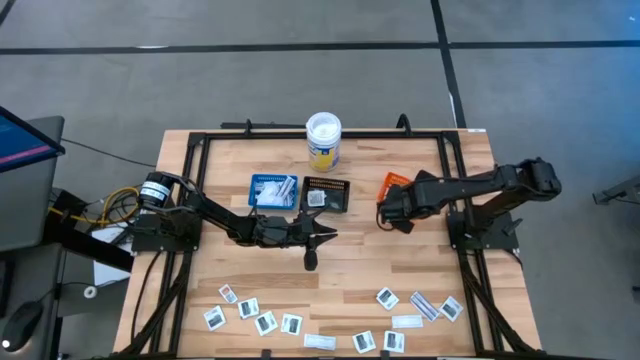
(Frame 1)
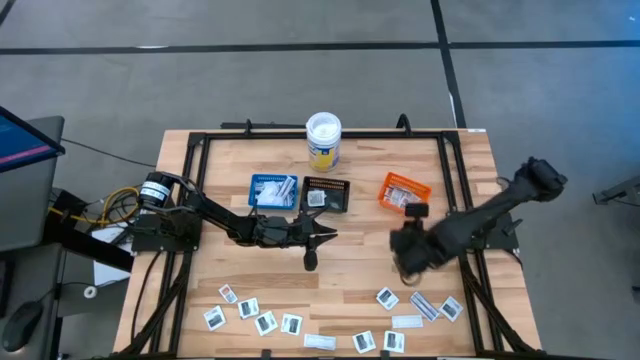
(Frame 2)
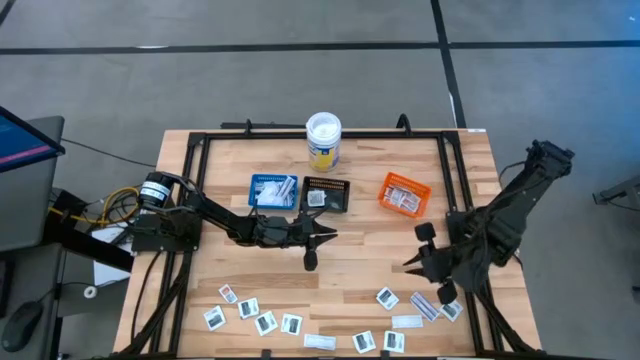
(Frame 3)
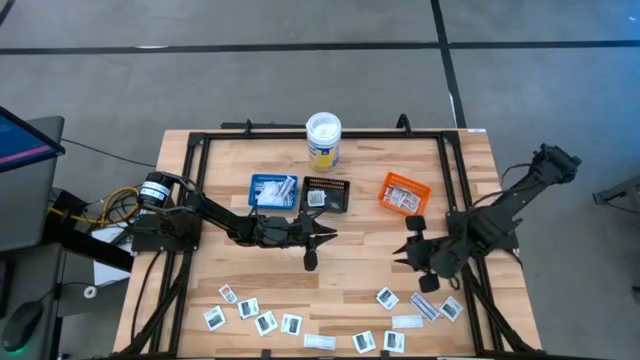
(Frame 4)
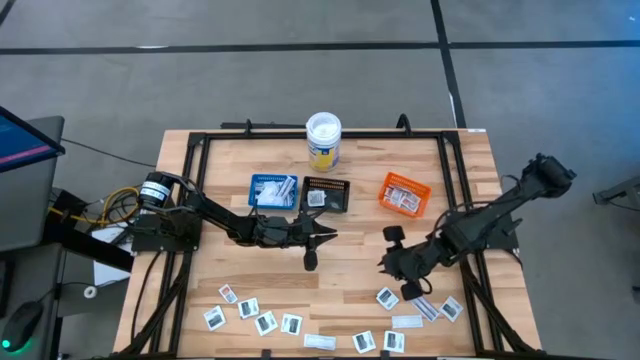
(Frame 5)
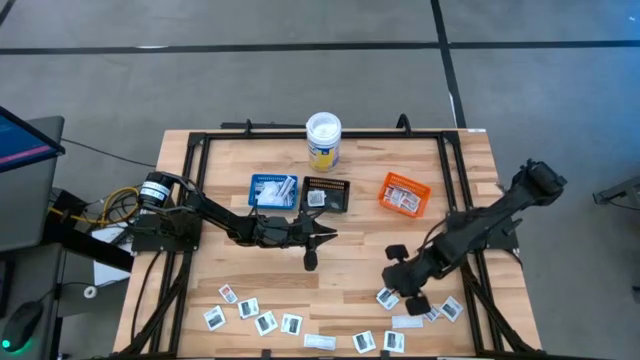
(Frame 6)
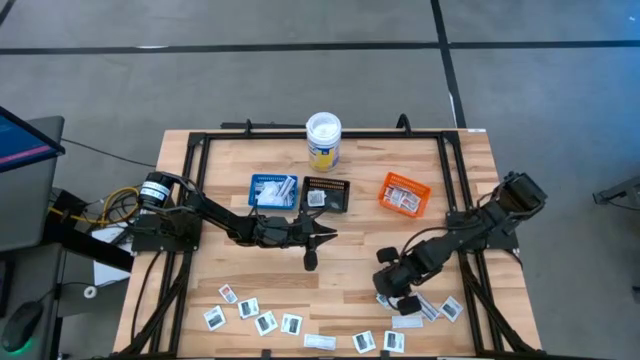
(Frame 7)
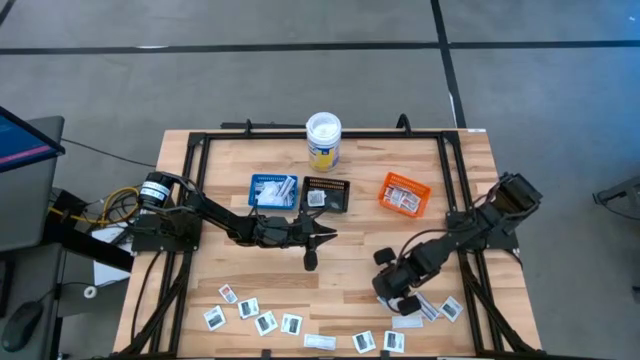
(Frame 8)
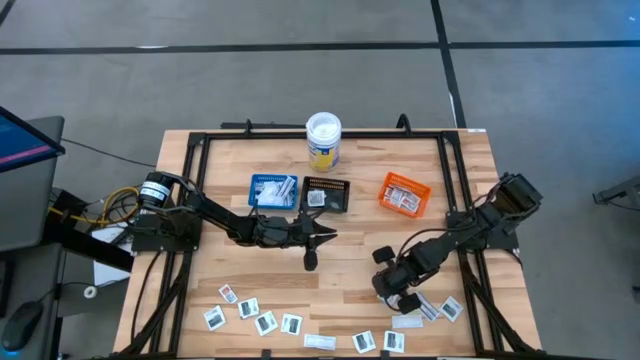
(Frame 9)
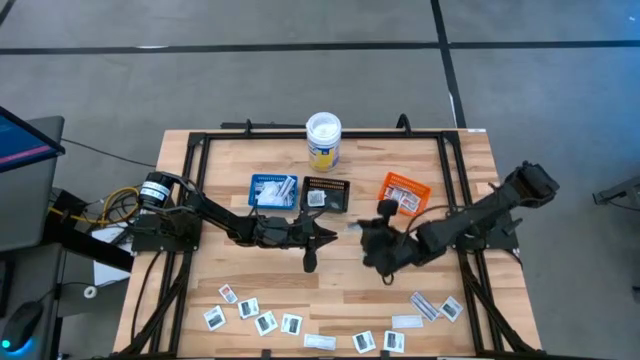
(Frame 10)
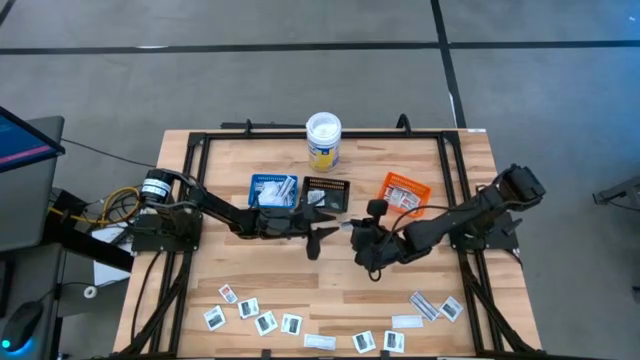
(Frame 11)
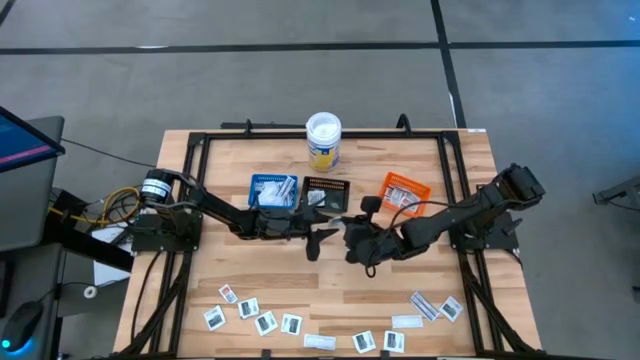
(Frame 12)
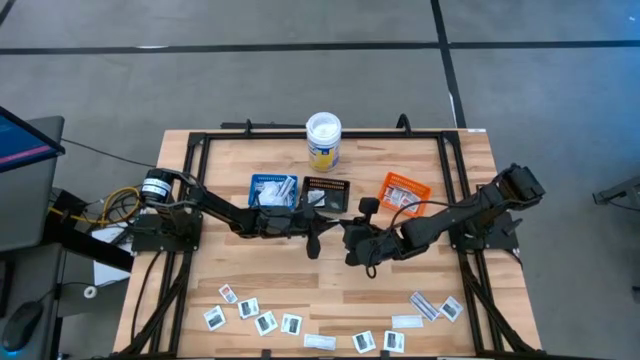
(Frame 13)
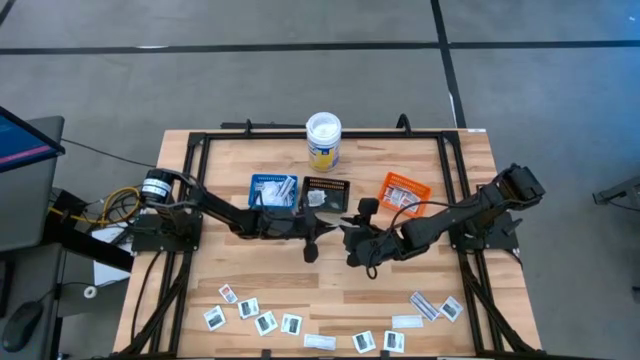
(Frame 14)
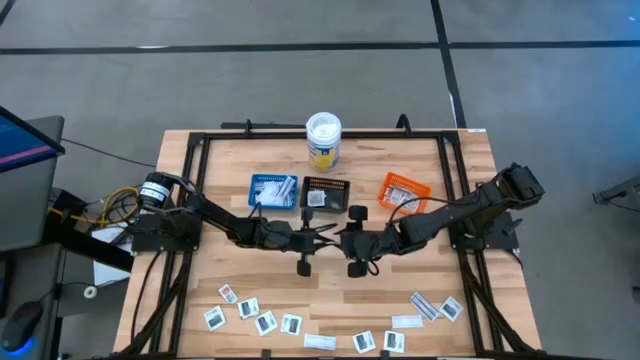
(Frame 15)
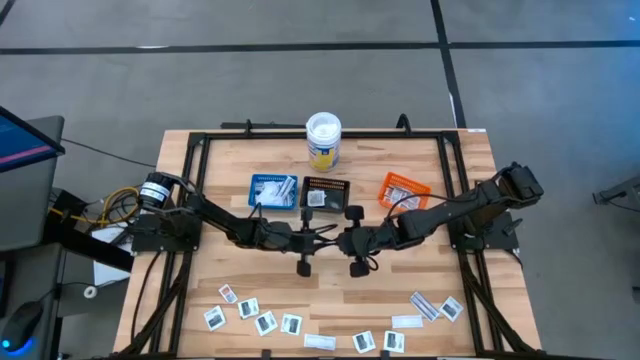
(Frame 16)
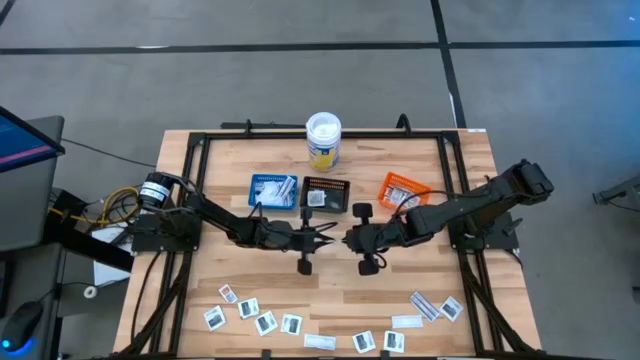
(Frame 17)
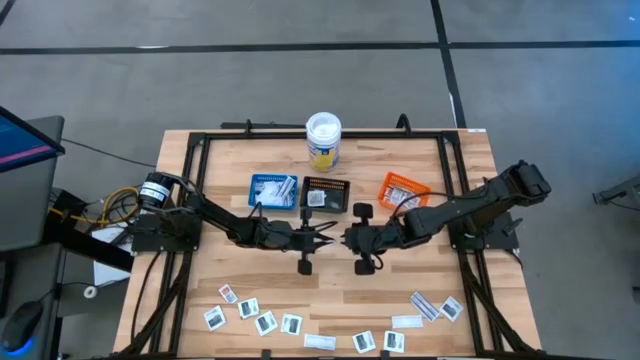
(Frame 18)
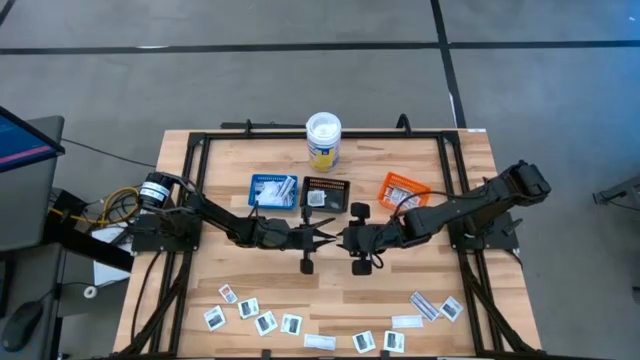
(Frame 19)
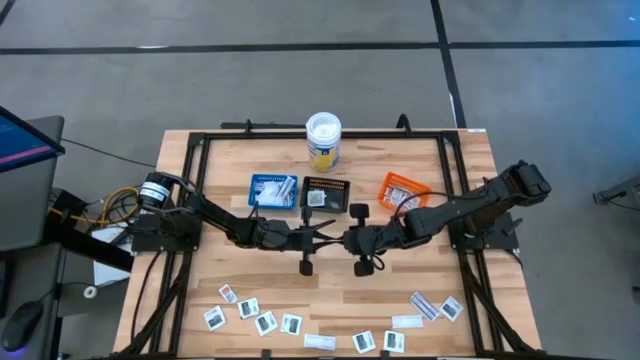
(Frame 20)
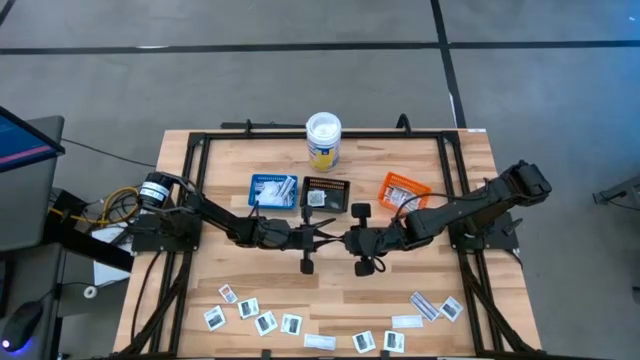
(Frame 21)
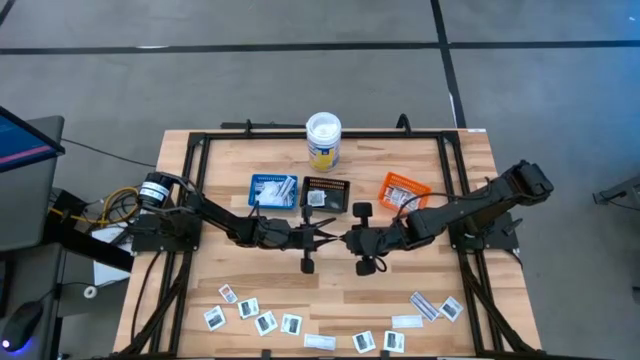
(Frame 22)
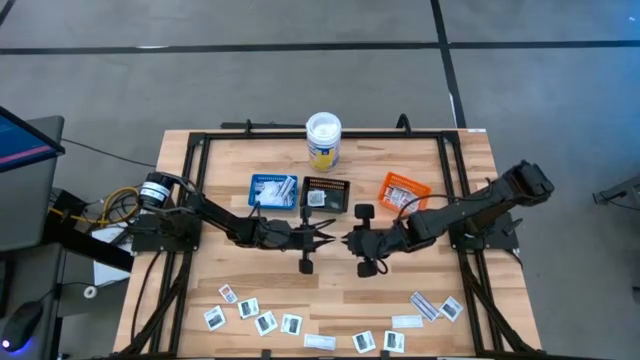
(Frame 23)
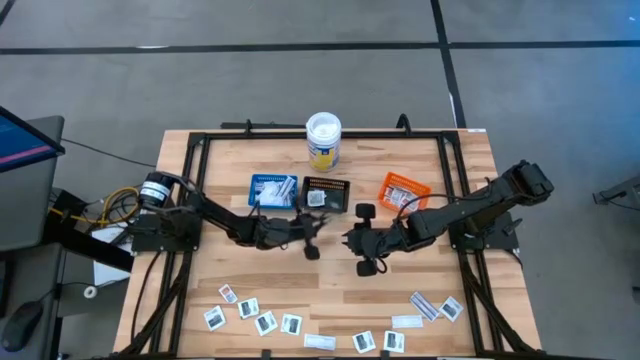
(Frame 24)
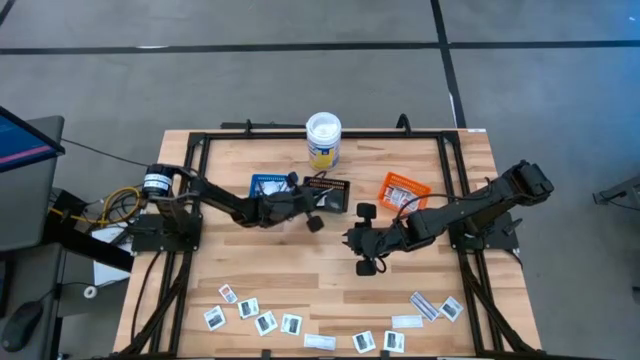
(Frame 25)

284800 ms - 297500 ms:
Task: Pick & Place First Aid Supplies
Put the black towelette pack into the black bin

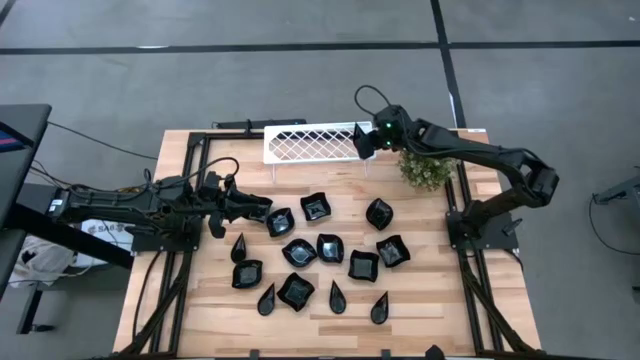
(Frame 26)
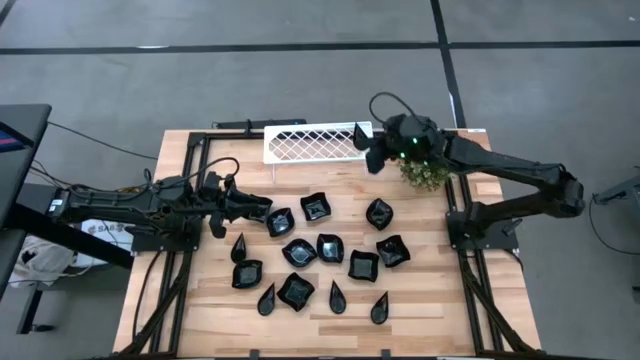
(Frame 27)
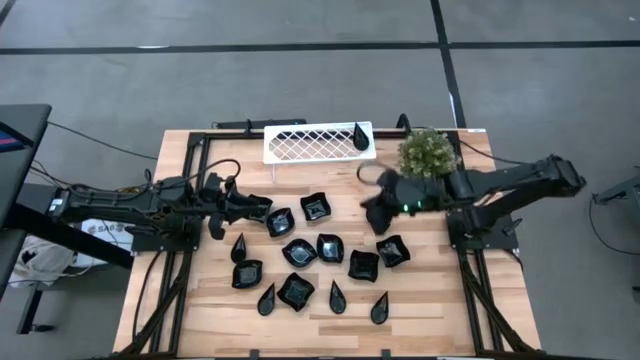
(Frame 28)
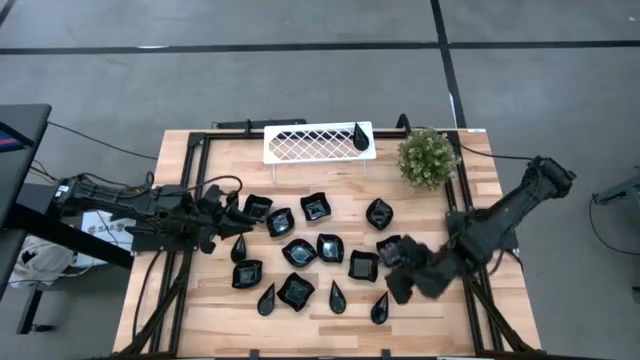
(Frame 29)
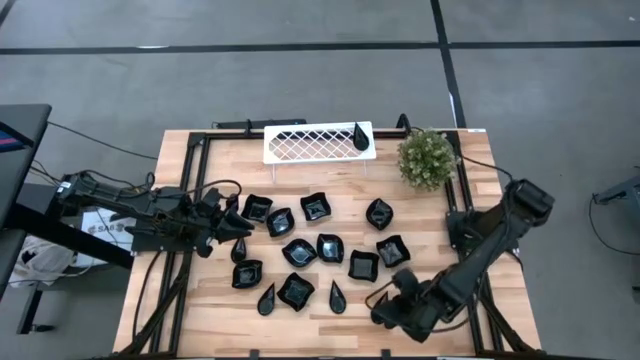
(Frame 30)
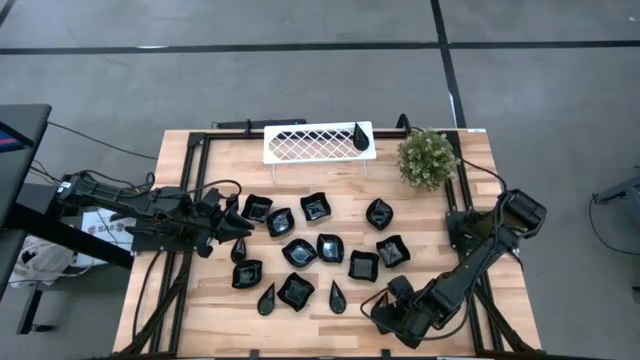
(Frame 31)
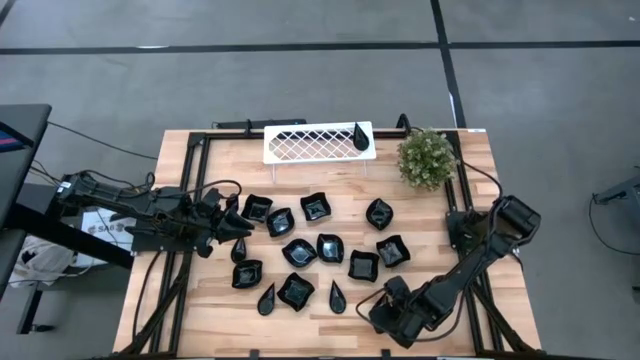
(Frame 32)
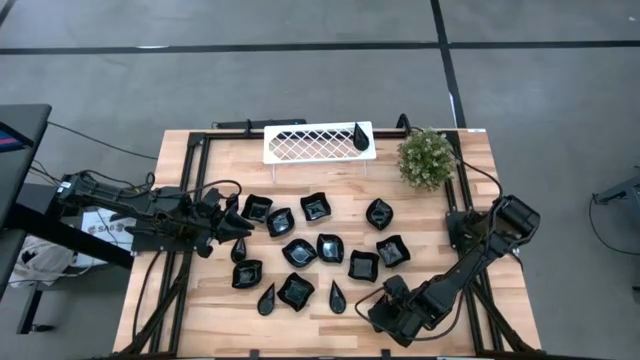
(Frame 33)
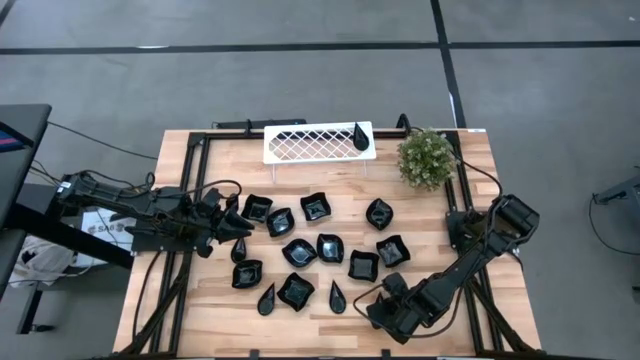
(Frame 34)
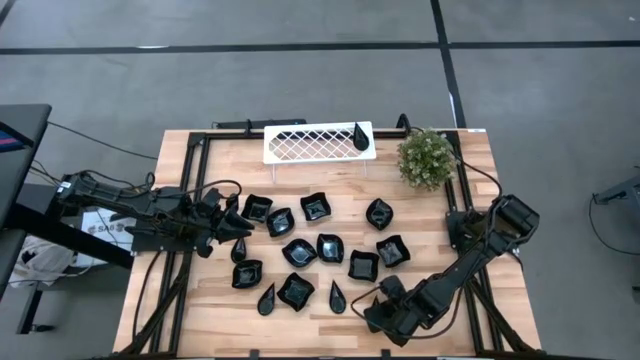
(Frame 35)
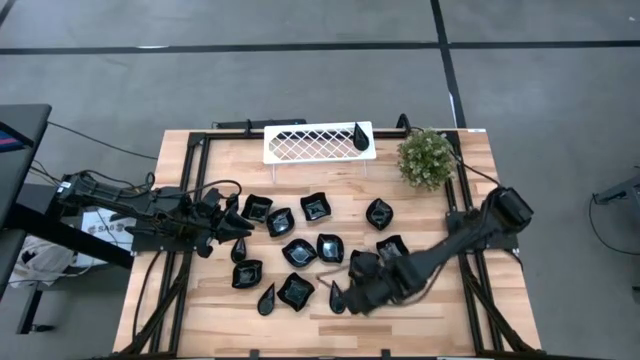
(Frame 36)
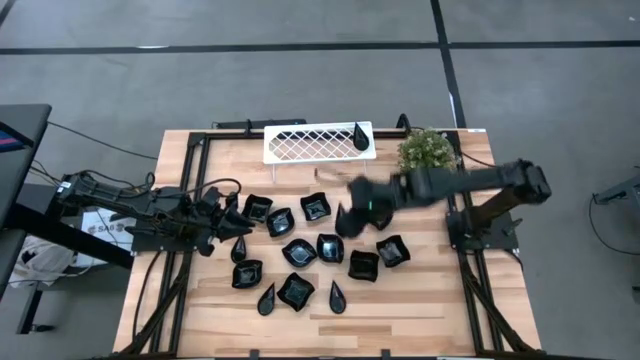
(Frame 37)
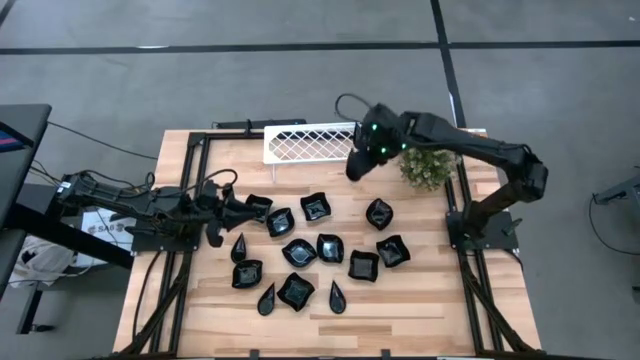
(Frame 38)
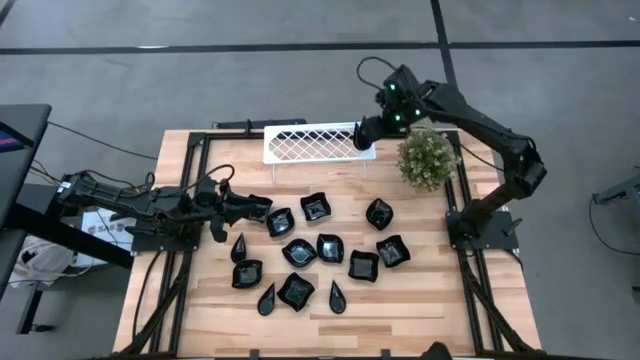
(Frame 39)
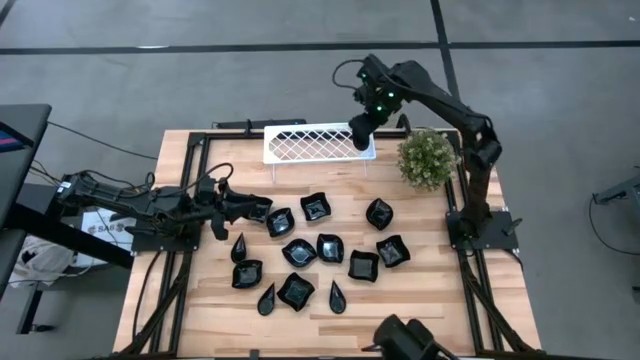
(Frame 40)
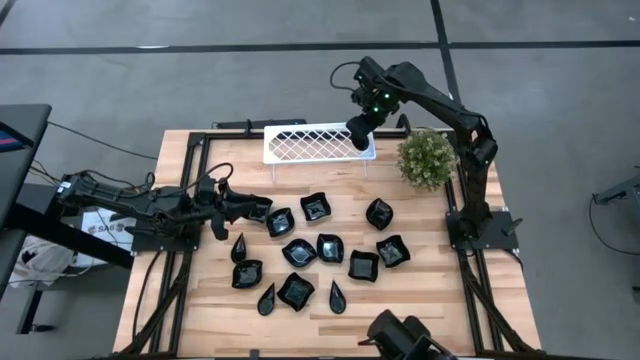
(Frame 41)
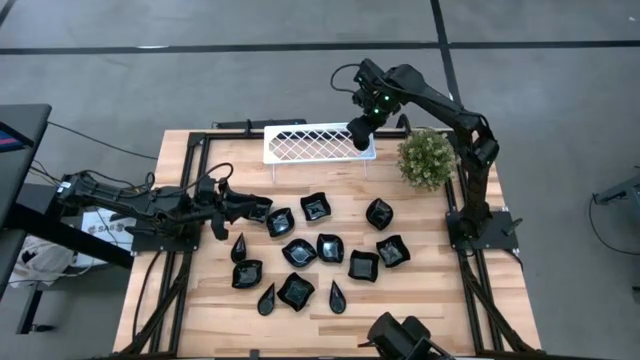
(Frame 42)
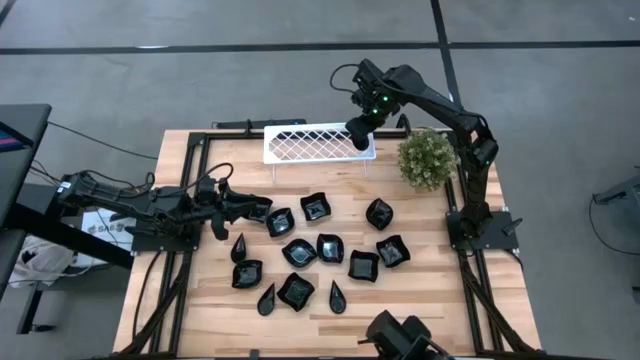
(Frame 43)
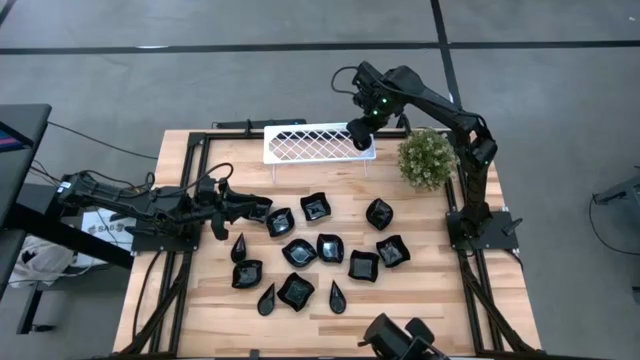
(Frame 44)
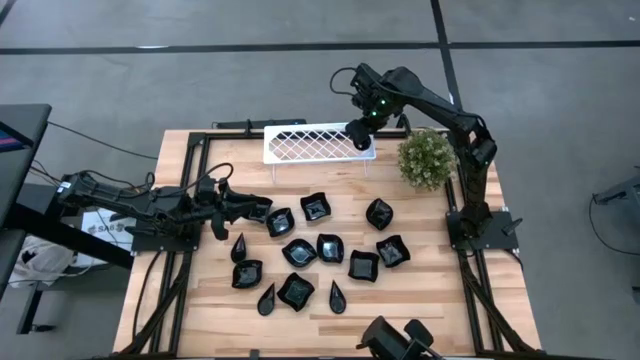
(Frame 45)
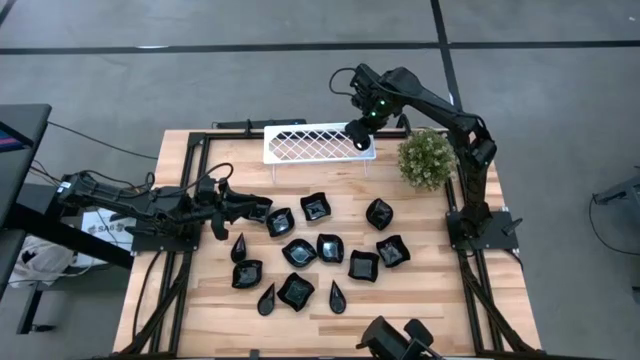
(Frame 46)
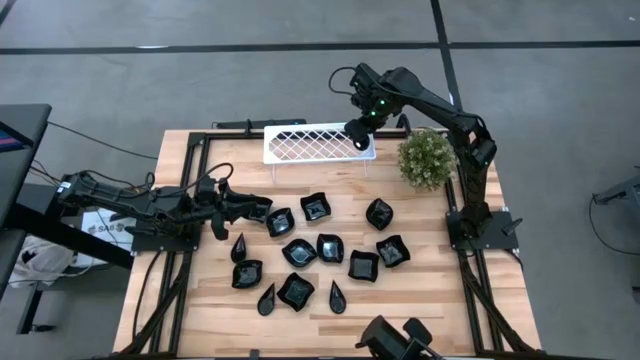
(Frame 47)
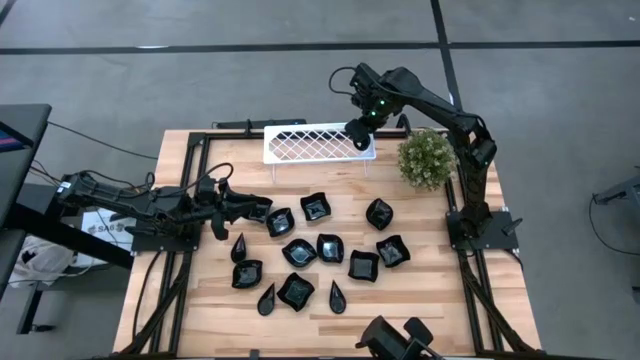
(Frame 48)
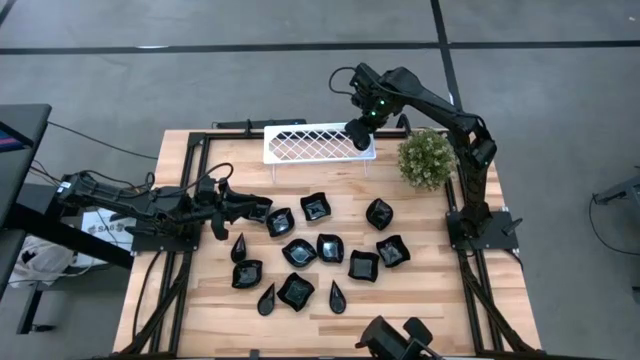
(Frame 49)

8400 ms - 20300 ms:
Task: Pick & Place Mini shaped plates
Stack the black drop shaped plate on top of the black drop shaped plate on the shelf
